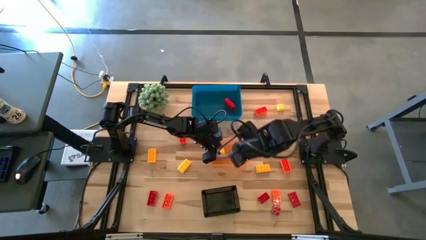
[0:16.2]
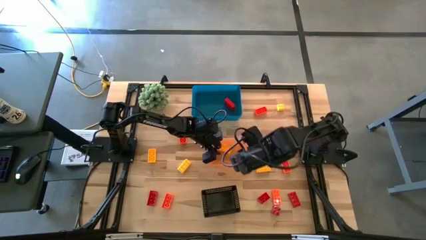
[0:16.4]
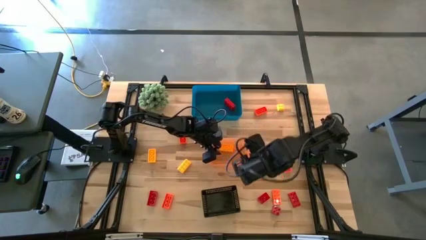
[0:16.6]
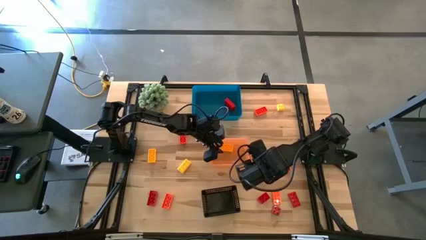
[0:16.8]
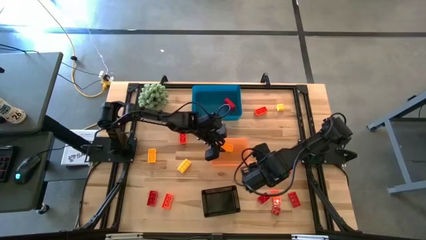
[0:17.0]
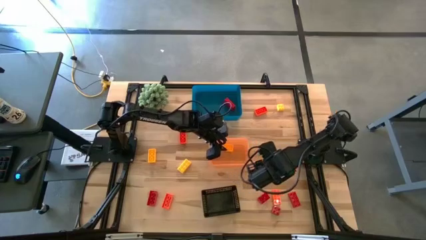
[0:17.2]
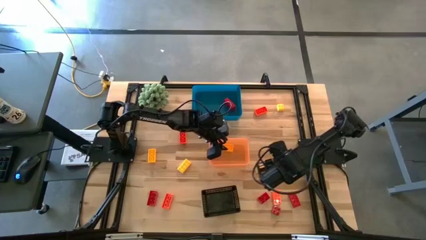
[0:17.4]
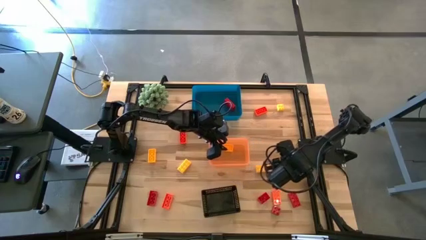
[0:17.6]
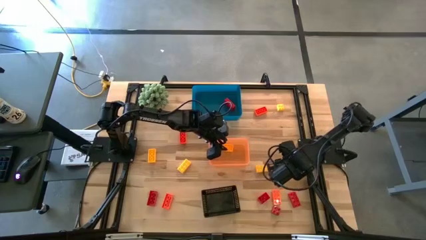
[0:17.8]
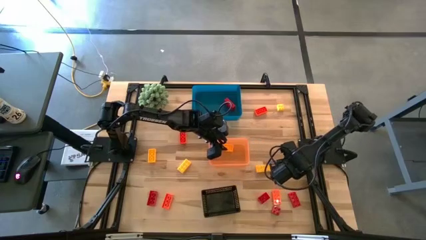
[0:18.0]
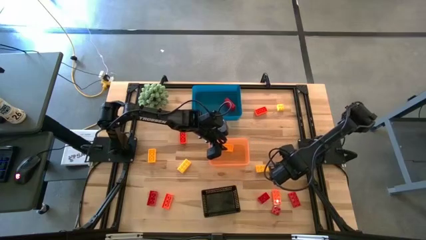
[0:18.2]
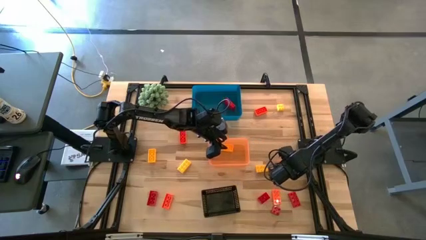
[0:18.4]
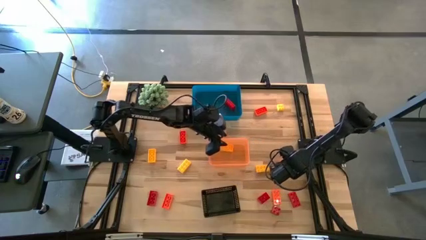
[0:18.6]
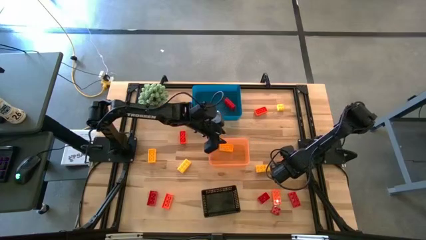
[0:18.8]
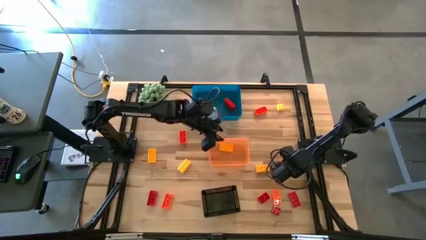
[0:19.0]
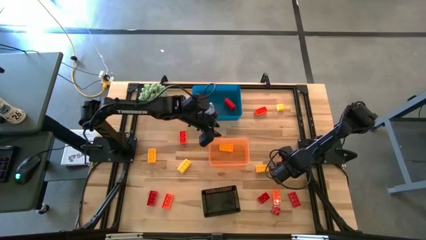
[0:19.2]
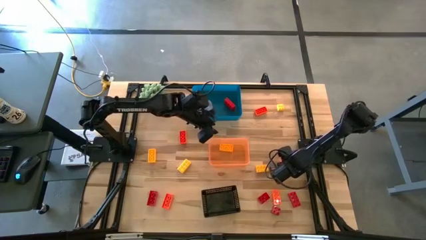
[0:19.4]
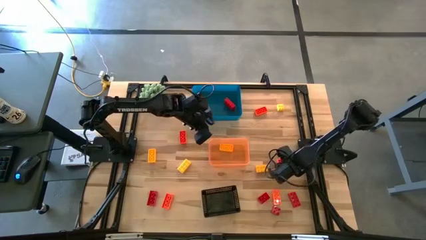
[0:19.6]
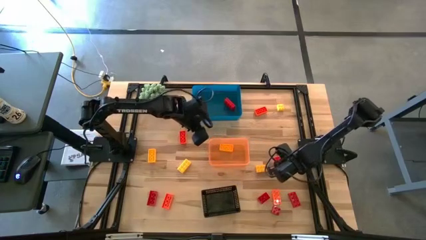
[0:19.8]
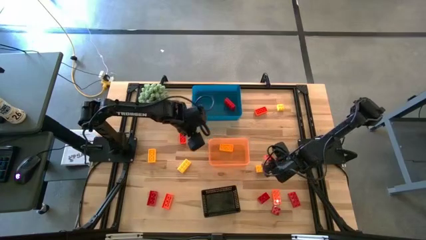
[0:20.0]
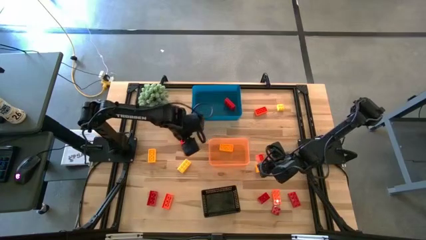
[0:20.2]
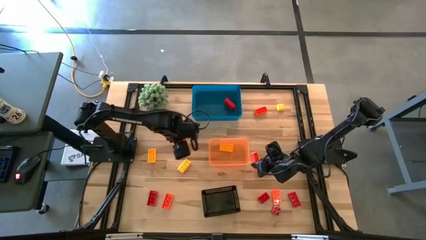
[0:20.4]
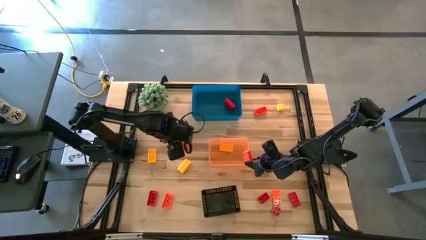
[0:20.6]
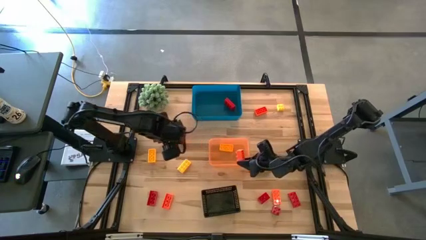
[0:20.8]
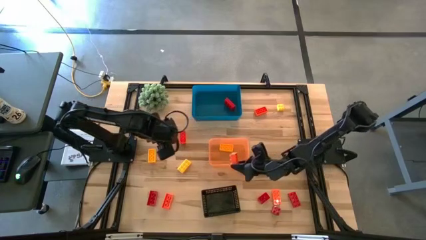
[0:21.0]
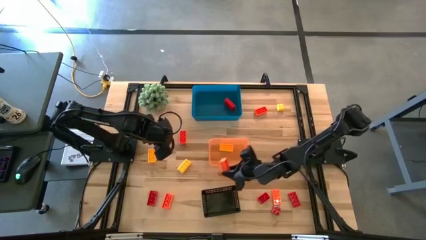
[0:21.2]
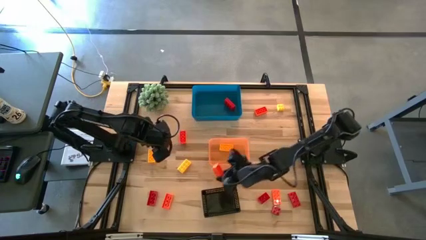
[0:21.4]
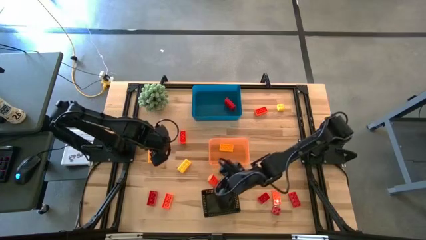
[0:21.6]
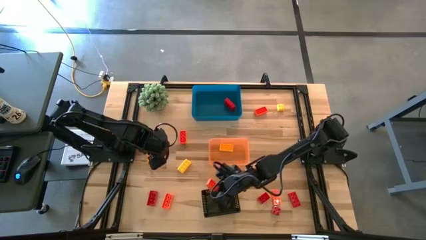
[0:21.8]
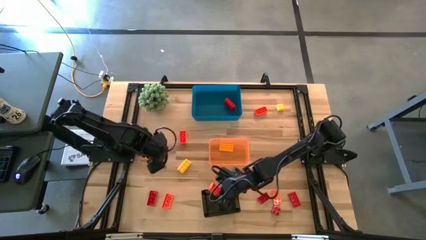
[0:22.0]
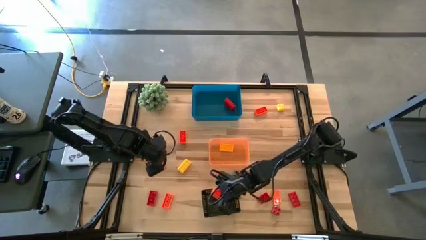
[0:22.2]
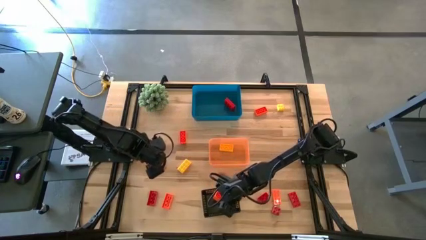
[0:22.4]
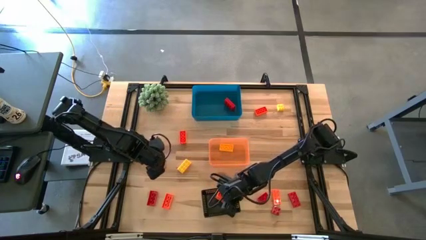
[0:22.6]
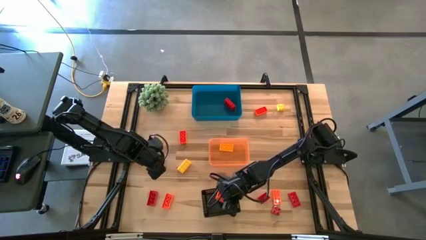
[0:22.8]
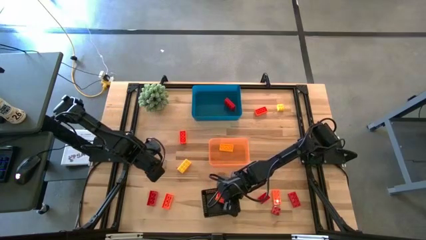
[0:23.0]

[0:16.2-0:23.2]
Task: Sort & place blocks by color
Put the orange game piece into the black bin

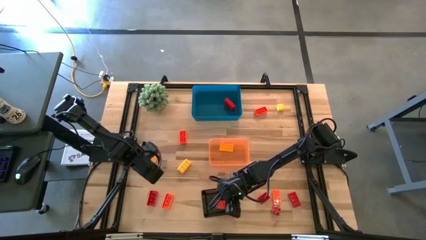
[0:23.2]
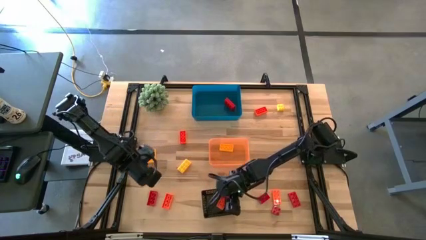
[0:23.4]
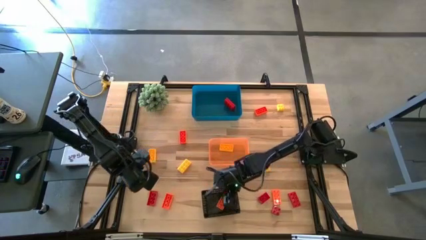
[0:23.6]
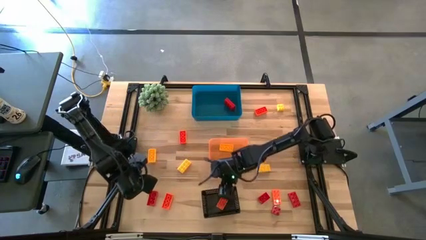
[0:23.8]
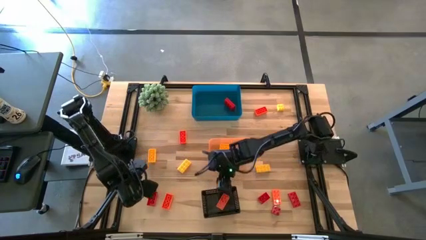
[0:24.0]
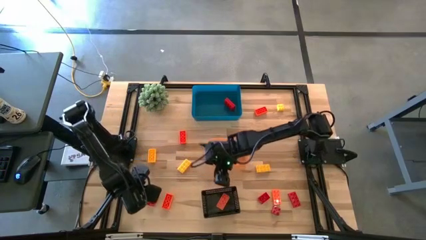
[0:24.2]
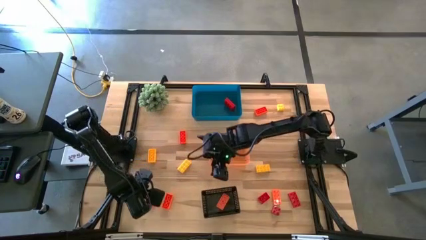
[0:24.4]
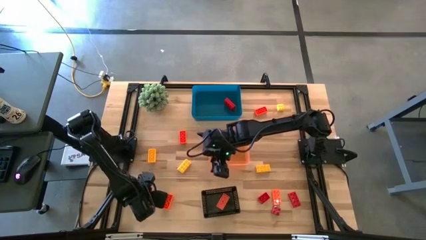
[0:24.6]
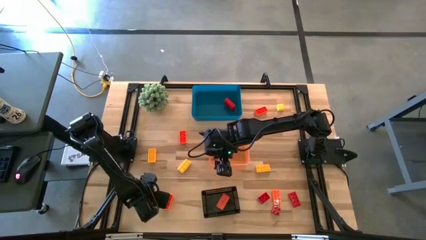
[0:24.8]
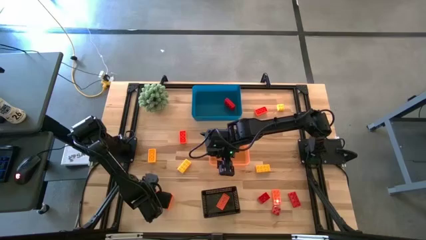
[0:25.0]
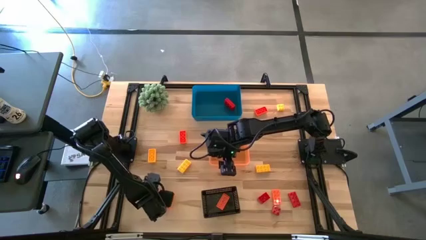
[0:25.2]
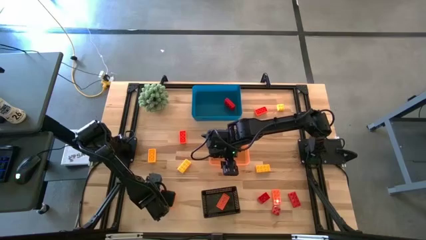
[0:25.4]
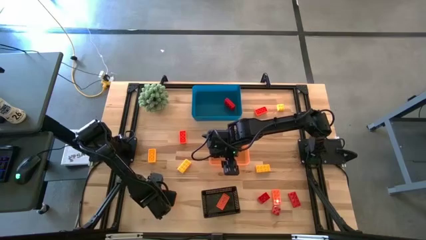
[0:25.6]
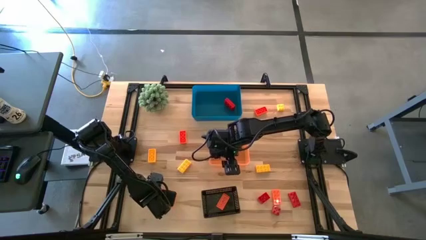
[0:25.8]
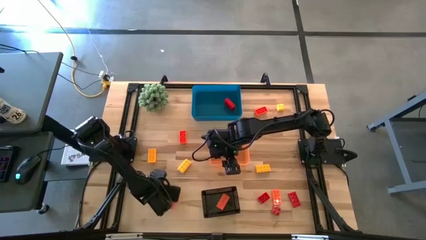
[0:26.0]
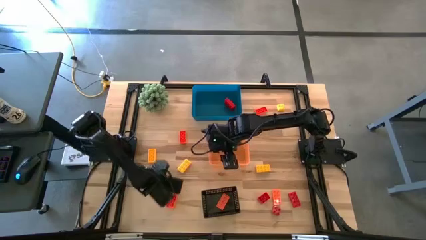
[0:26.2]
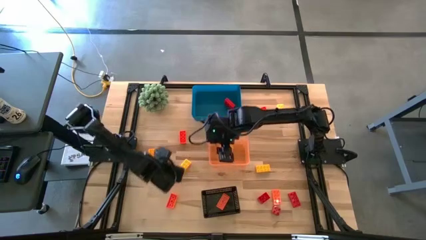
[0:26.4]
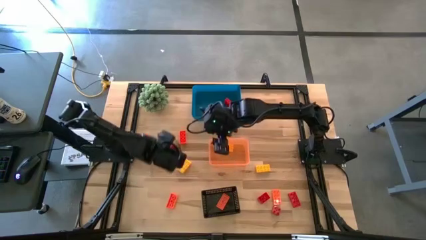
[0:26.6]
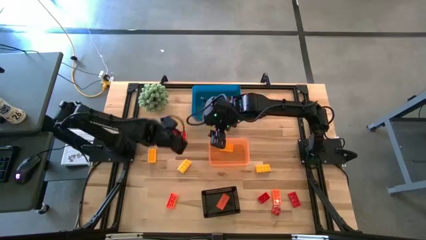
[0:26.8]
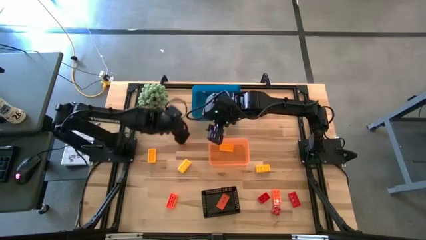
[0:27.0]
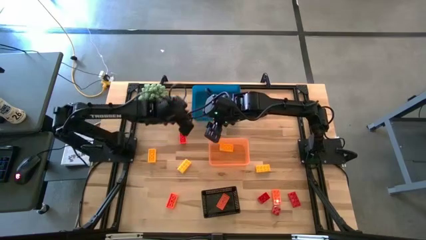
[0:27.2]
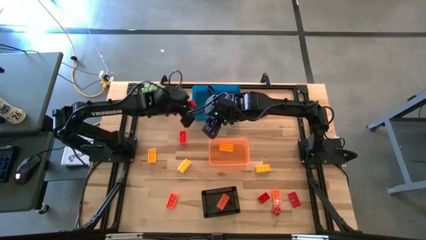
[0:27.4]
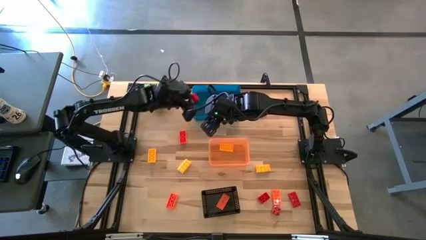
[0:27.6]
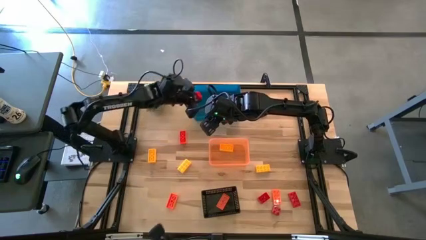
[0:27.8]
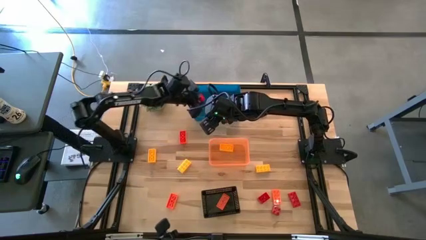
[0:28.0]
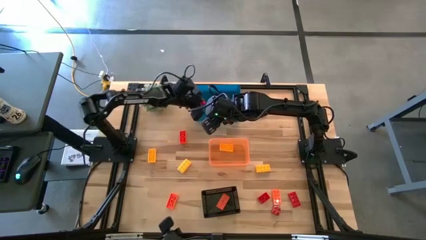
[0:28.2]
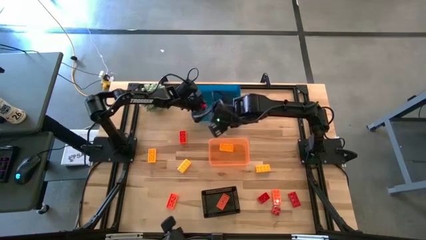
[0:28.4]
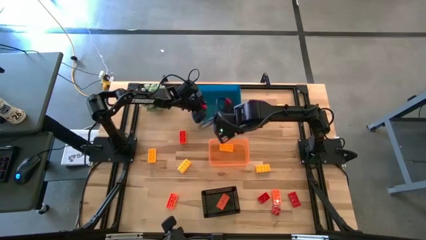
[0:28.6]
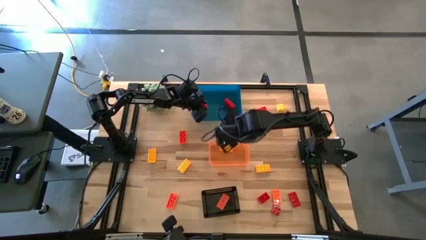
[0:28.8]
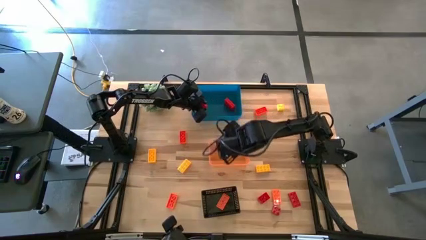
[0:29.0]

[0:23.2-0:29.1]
Put the red game piece into the blue bin

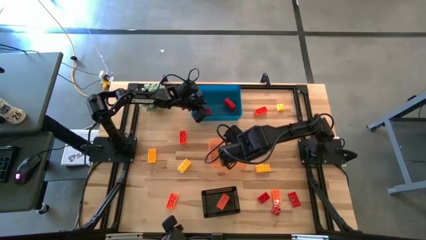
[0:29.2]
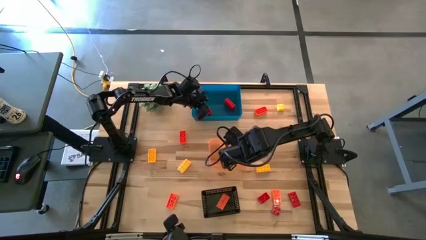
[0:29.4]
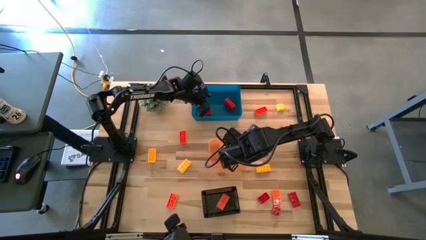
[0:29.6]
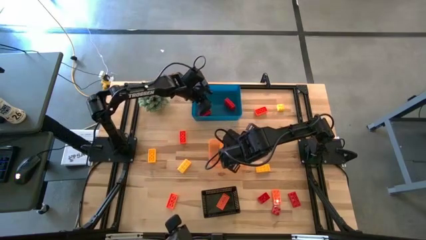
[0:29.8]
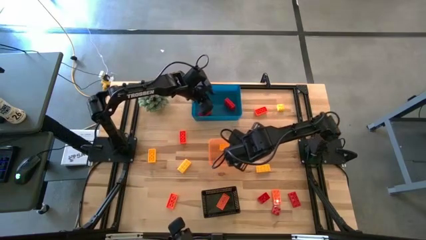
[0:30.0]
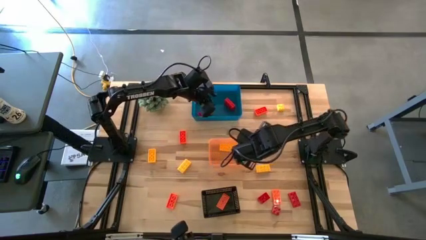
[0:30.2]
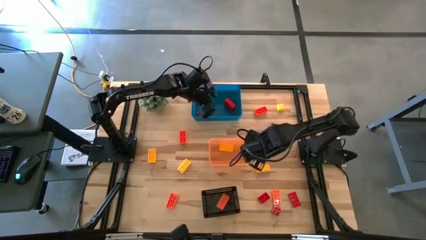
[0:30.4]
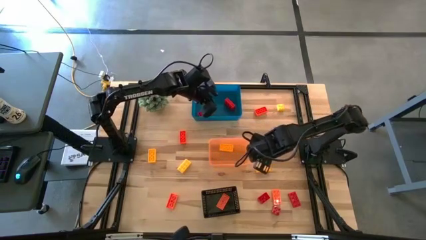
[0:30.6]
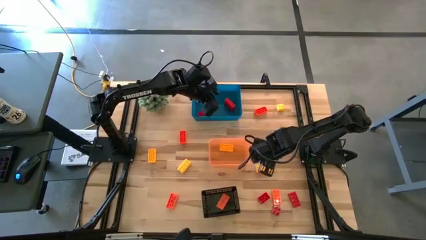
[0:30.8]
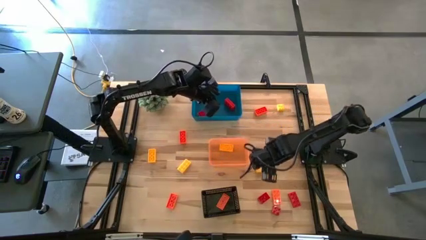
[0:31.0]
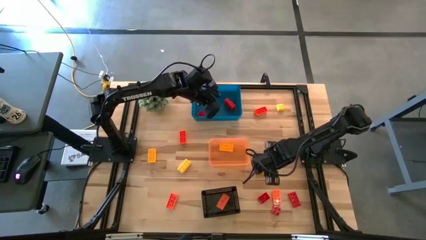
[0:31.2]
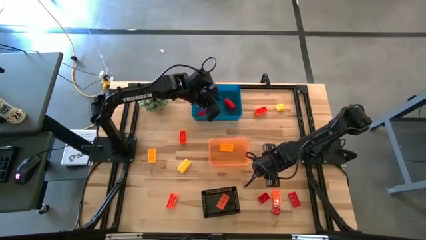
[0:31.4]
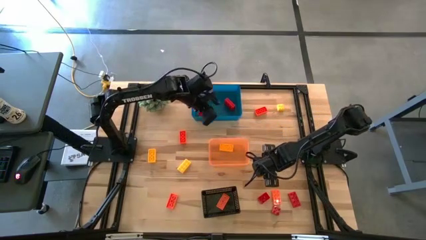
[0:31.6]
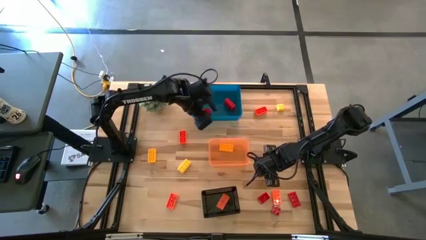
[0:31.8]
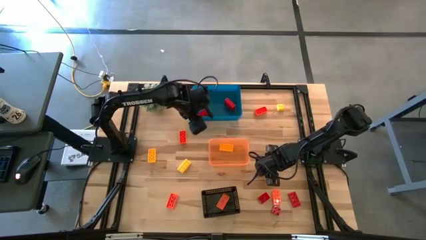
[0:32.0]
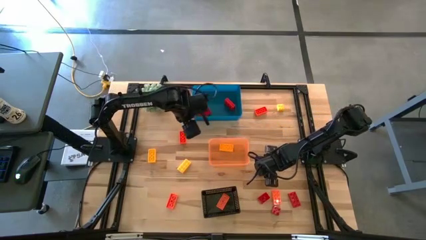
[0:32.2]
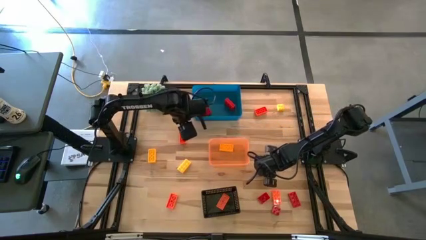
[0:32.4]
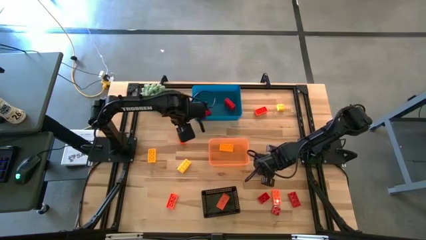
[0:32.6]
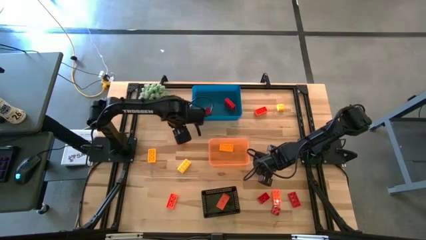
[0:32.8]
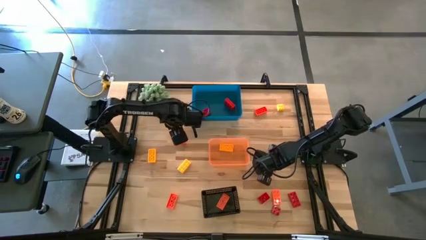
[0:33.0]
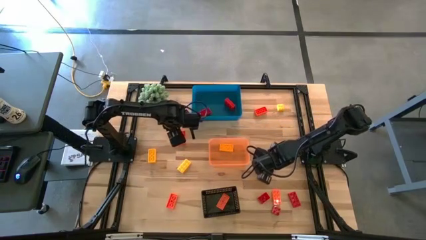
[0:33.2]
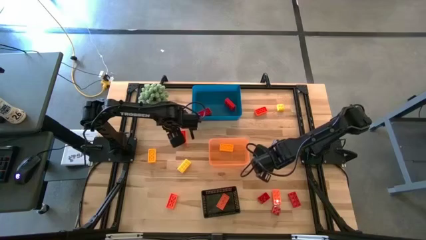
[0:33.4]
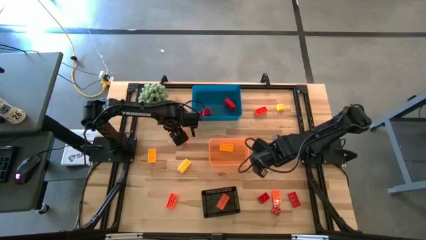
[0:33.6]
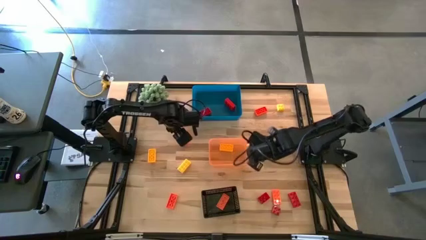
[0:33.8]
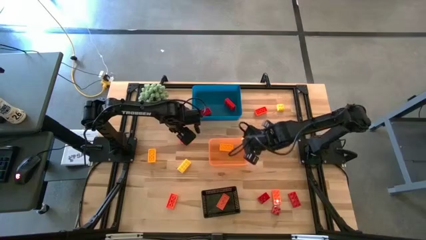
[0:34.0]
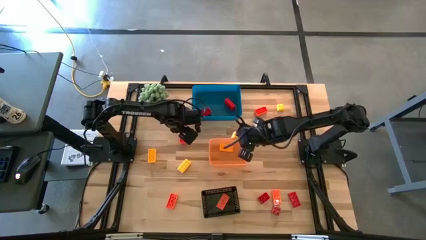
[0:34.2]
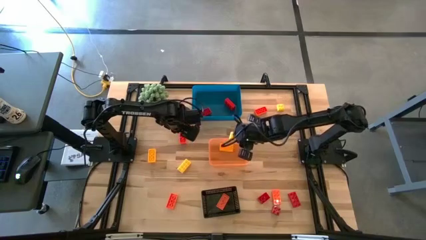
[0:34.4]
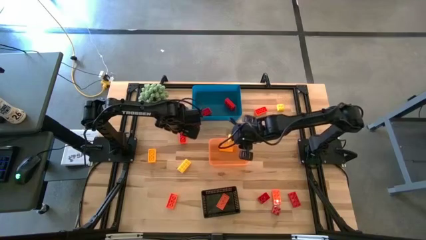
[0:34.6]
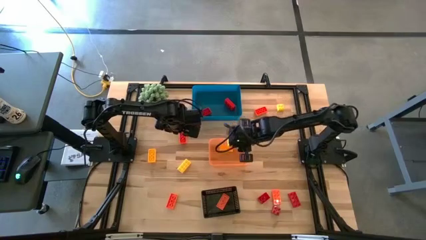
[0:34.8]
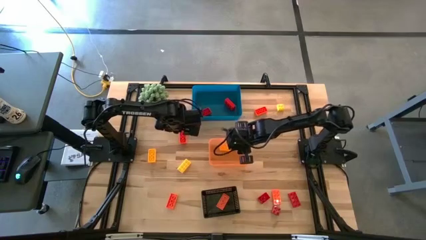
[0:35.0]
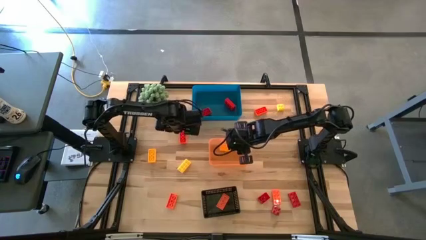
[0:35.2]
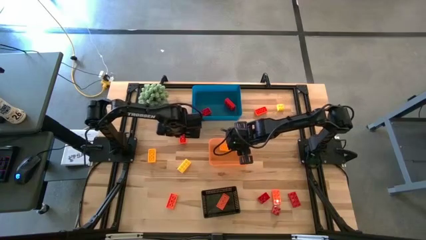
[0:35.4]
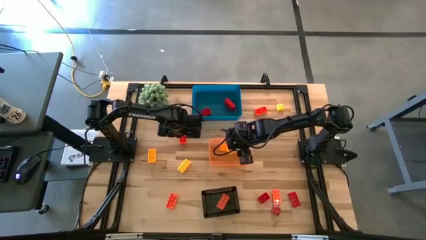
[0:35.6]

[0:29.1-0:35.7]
Put the yellow game piece into the orange bin
